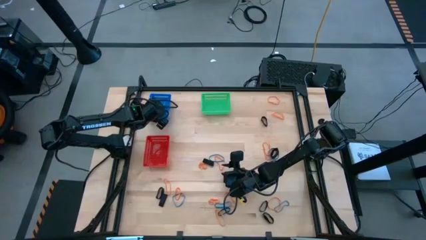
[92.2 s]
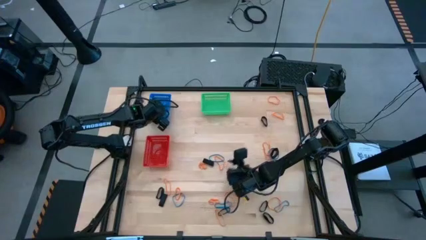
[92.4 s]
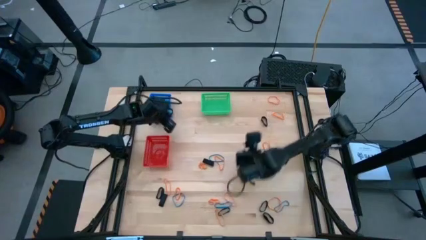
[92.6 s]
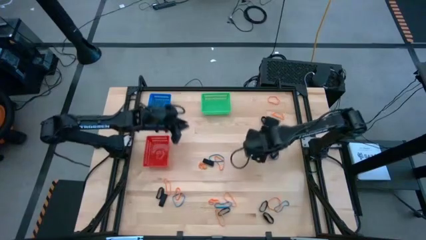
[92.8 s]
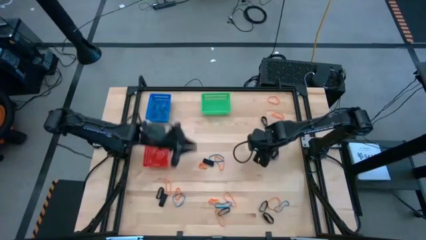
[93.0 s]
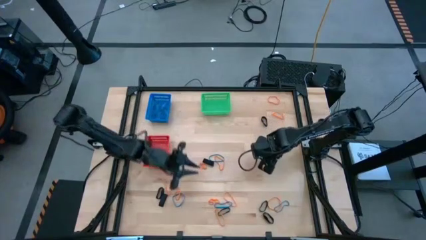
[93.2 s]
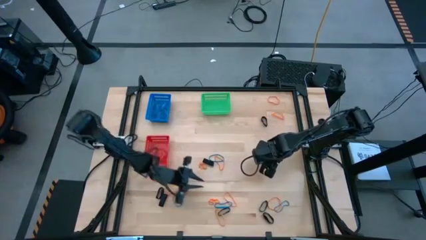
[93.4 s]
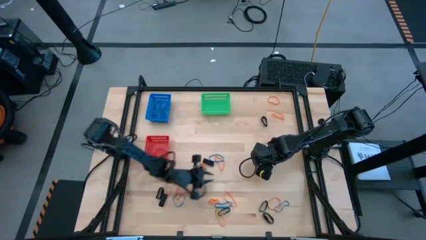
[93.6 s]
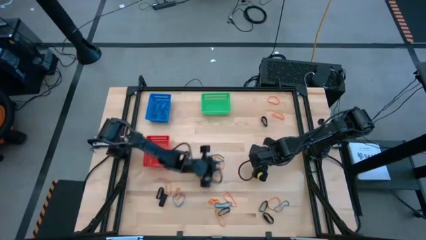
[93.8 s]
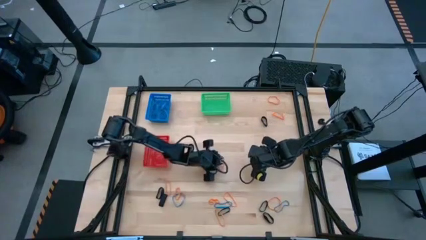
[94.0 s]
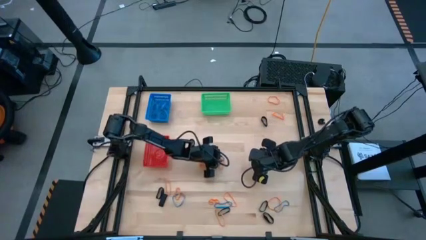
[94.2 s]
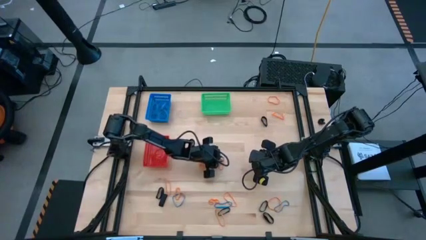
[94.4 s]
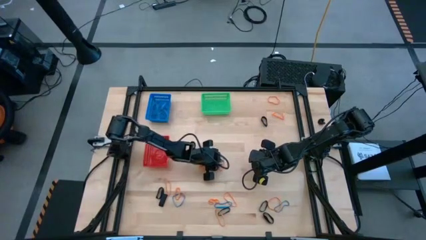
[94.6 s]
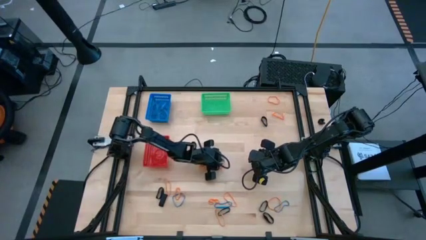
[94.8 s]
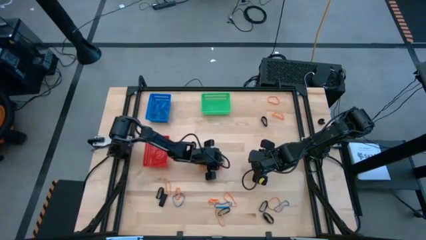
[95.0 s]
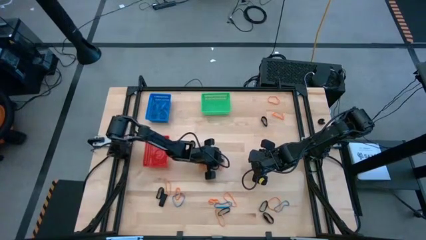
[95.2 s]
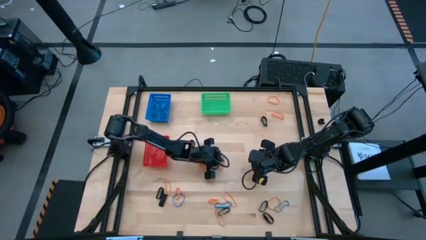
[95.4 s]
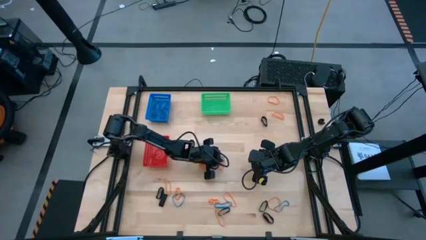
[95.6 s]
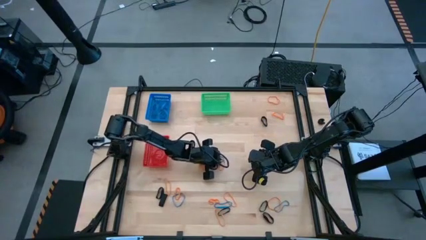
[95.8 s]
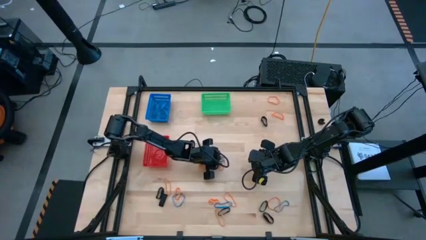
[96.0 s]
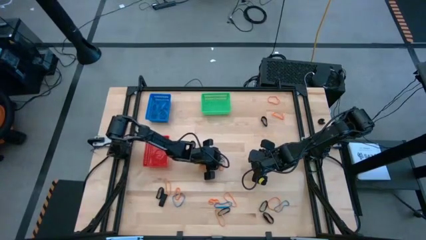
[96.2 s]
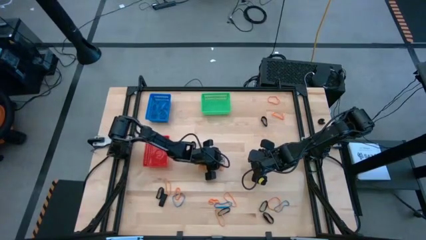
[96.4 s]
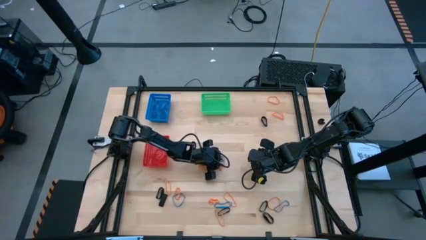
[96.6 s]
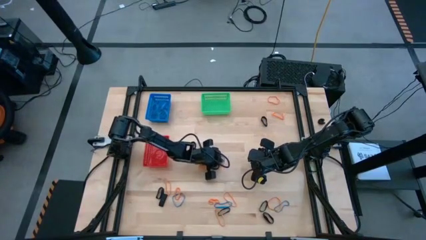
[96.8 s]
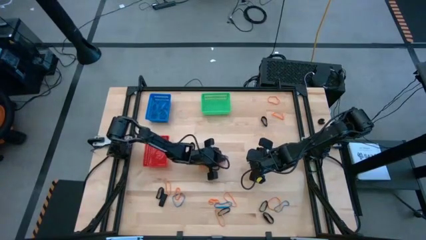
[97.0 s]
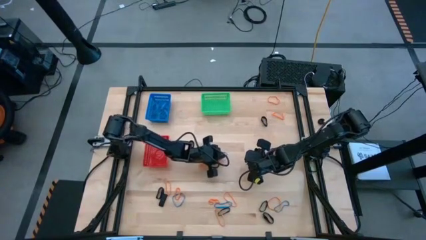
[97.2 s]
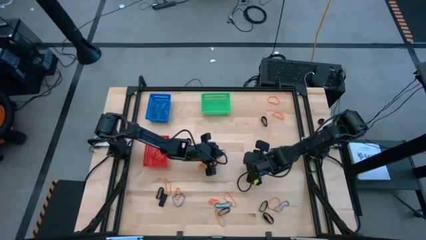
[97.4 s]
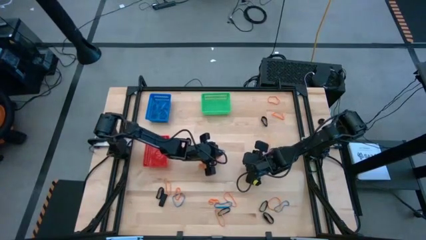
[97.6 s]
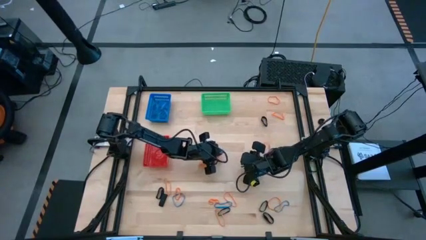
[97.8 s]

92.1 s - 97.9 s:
Task: Sort rubber bands into baskets
Put the blue rubber band into the blue bin

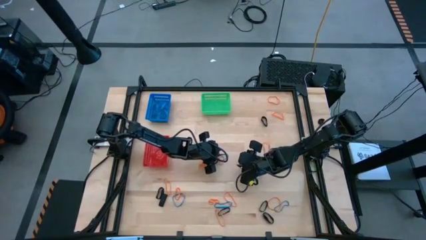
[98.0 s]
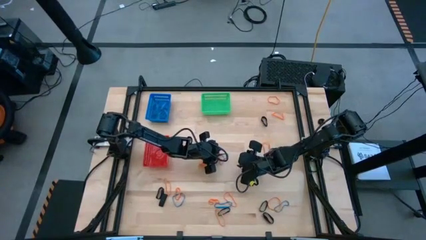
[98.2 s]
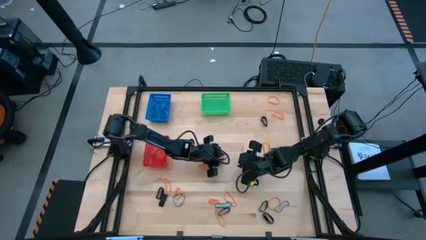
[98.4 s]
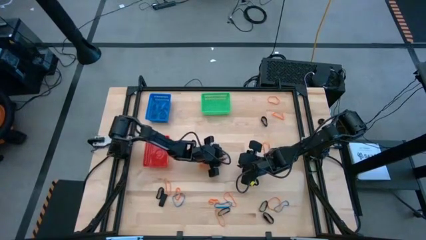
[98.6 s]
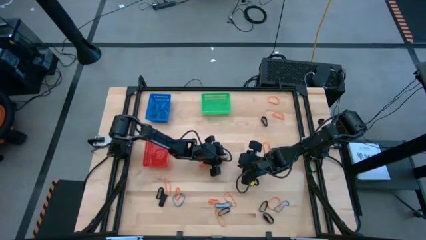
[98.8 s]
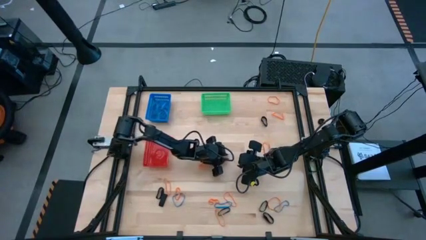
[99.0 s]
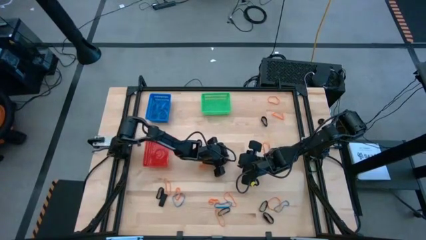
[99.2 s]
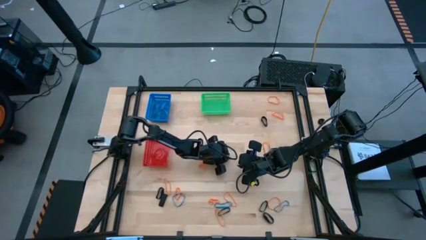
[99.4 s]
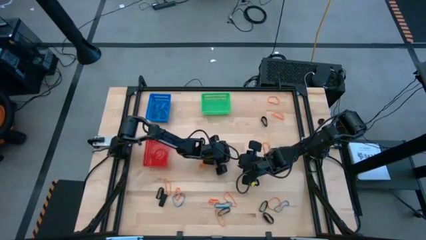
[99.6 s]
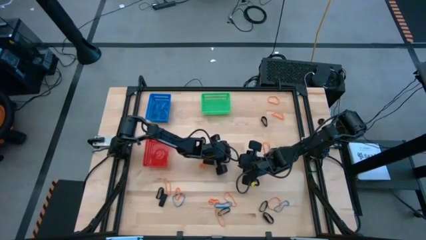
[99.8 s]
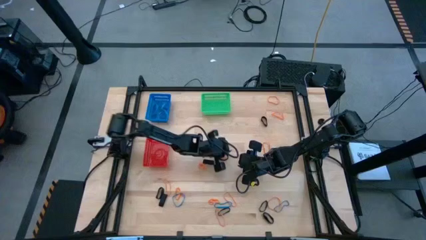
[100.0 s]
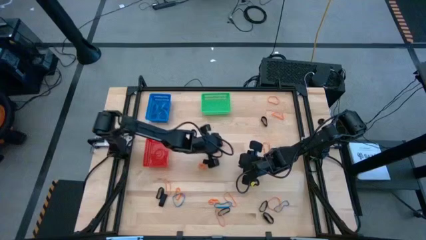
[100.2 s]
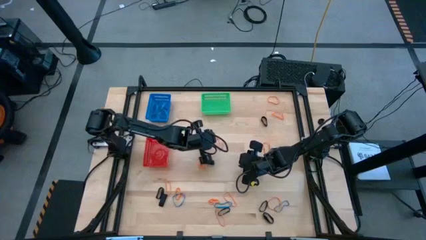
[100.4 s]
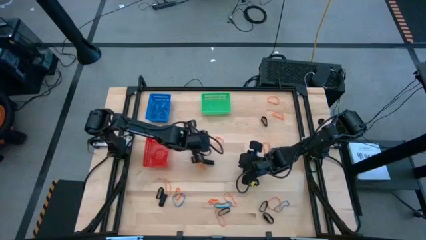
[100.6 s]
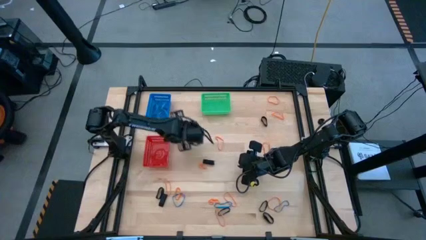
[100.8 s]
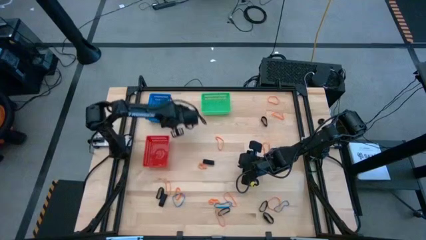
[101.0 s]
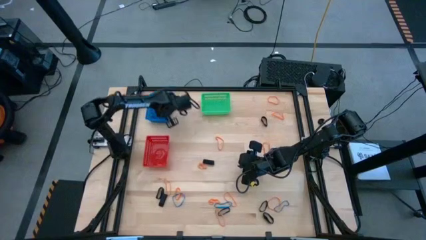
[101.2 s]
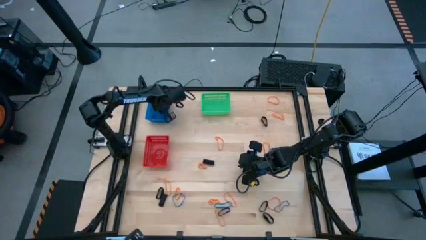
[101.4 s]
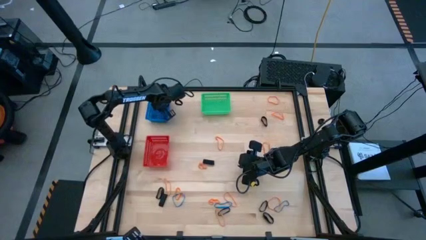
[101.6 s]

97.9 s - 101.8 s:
Put the blue rubber band into the blue bin

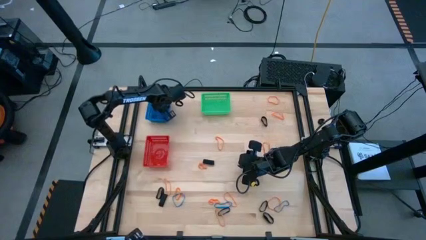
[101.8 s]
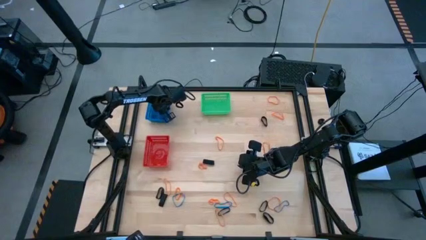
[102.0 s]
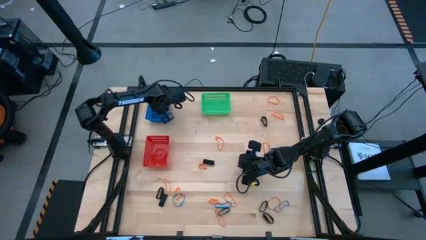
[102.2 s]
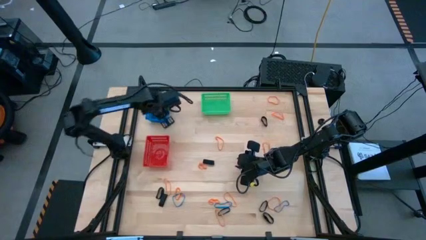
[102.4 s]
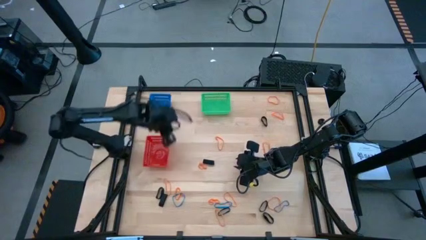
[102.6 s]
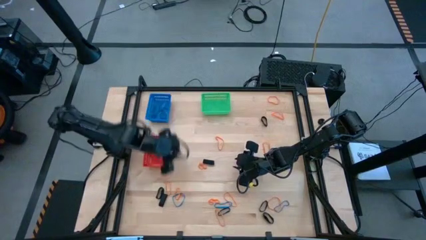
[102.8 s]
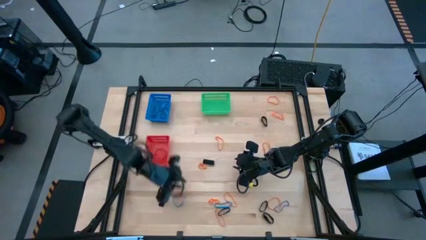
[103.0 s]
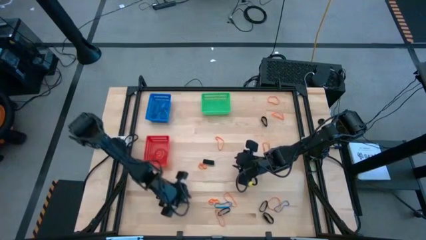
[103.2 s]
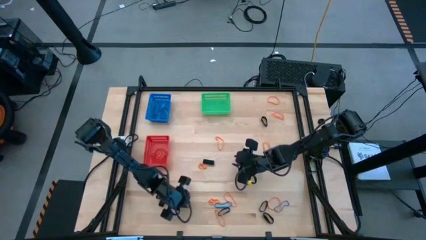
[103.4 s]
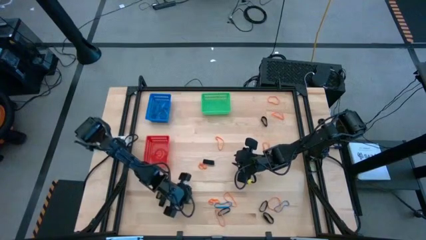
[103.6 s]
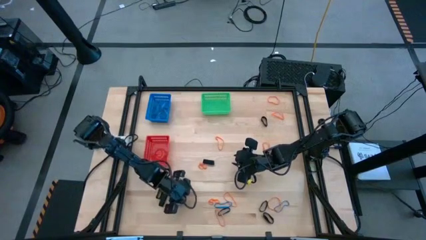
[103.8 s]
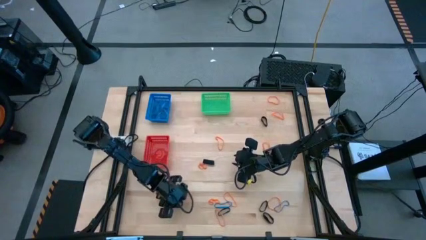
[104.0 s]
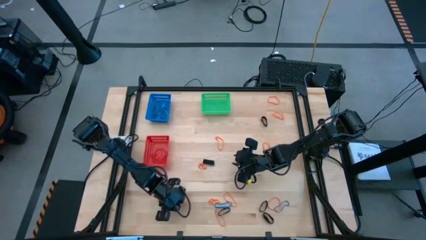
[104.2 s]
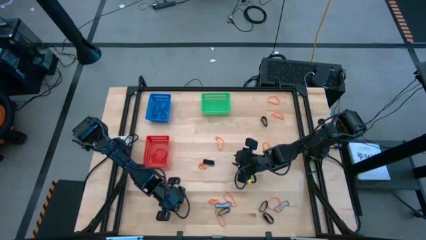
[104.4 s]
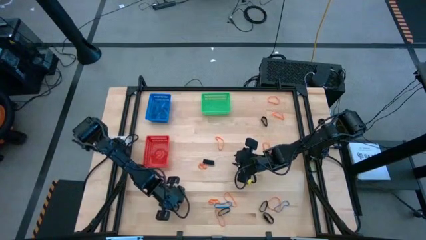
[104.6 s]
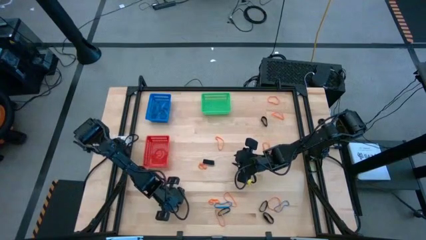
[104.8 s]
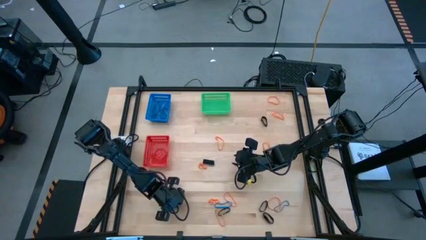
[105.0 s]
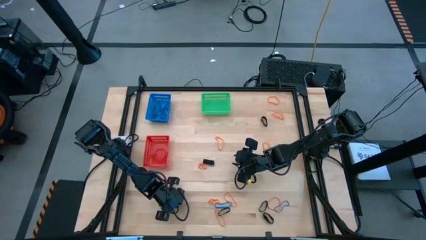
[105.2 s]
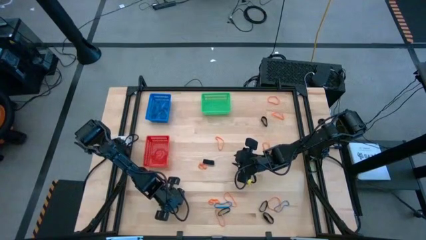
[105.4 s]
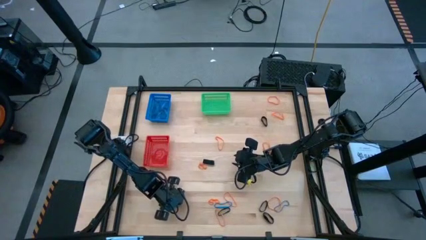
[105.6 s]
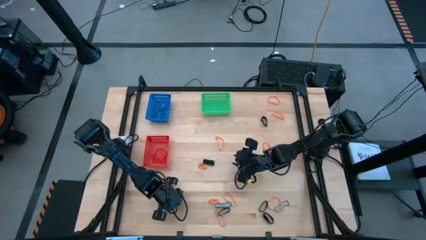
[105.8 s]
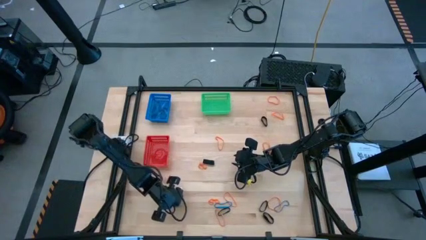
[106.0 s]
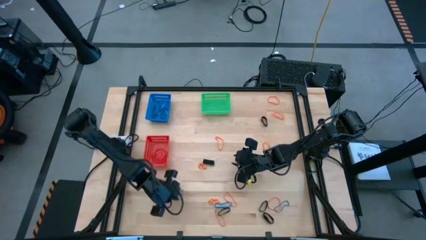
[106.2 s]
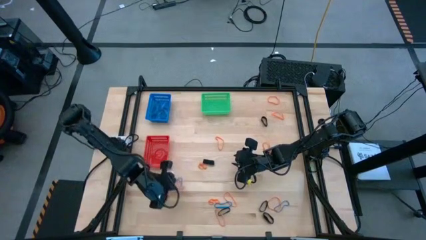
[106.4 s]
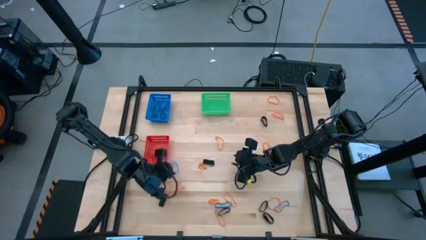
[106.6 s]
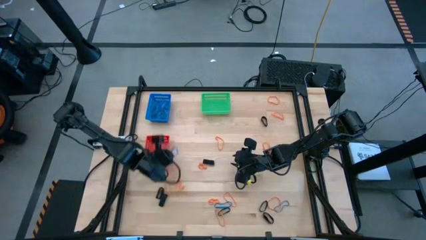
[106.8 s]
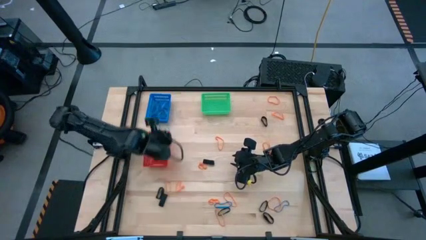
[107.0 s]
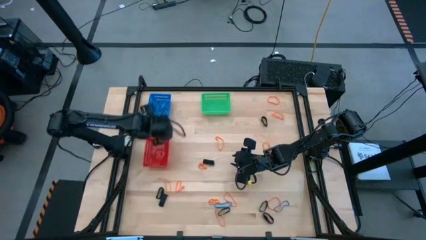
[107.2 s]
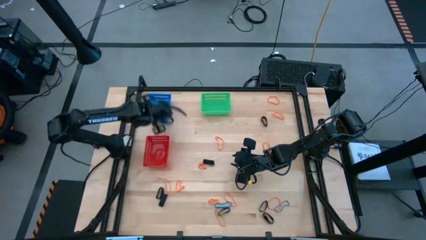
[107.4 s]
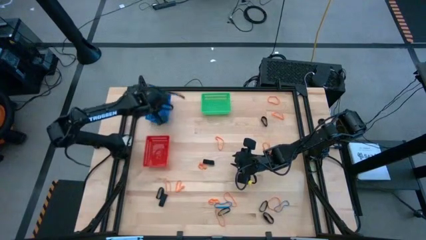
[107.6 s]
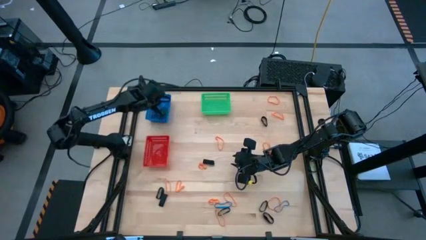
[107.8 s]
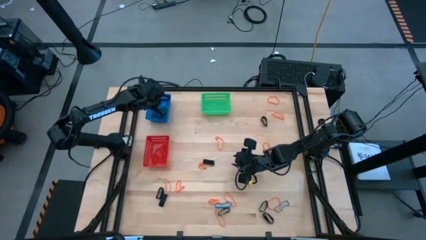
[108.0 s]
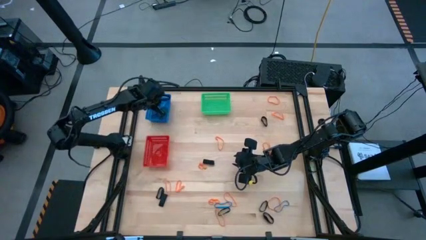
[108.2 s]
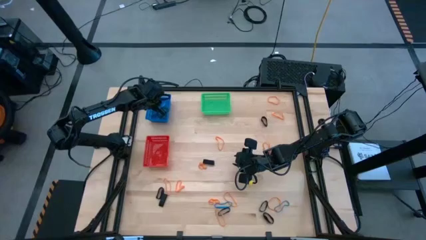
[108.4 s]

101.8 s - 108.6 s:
Put the blue rubber band into the blue bin

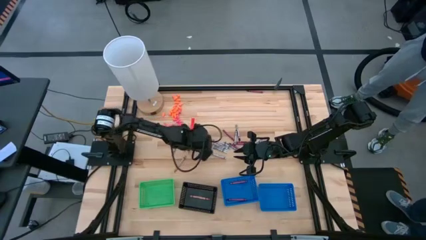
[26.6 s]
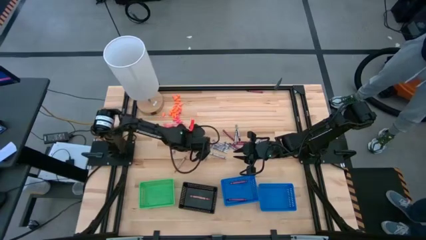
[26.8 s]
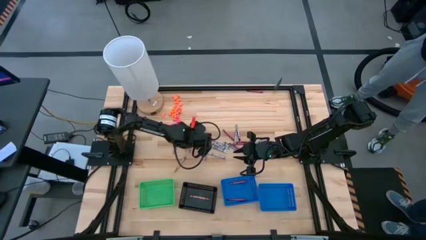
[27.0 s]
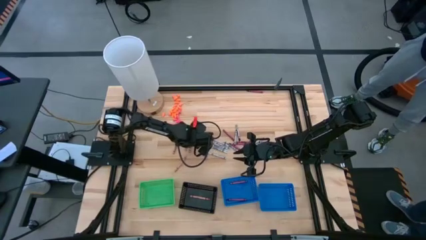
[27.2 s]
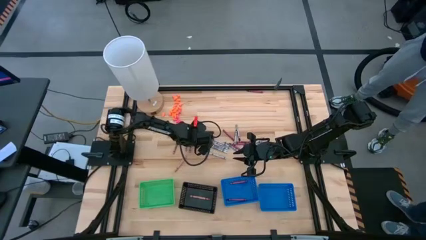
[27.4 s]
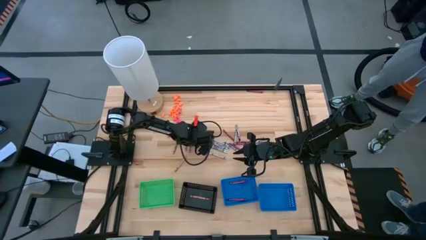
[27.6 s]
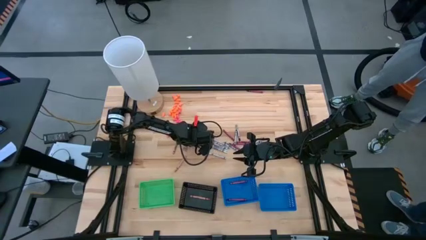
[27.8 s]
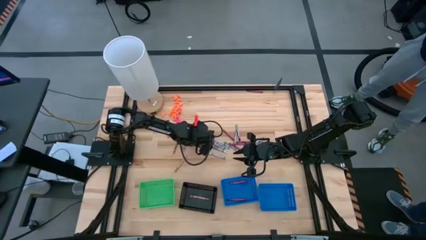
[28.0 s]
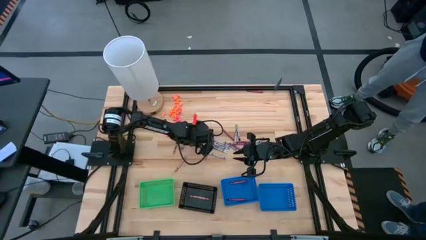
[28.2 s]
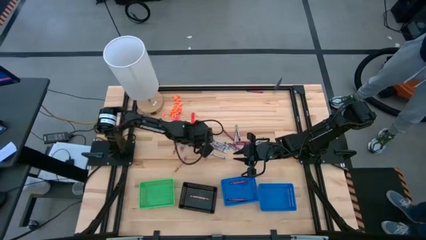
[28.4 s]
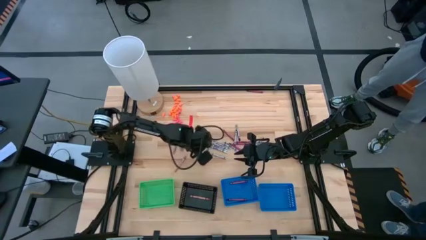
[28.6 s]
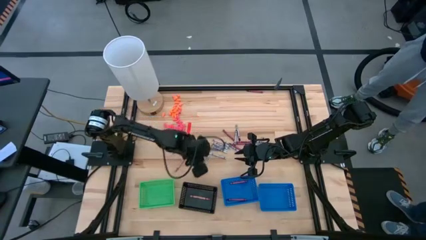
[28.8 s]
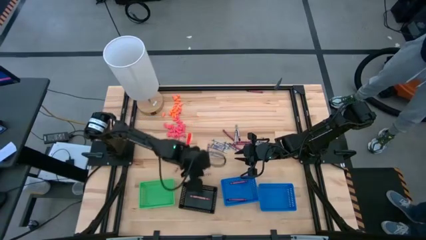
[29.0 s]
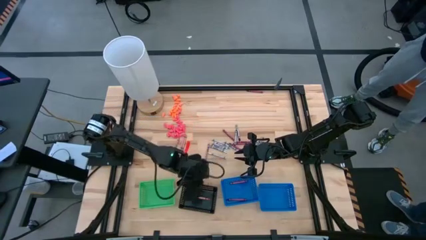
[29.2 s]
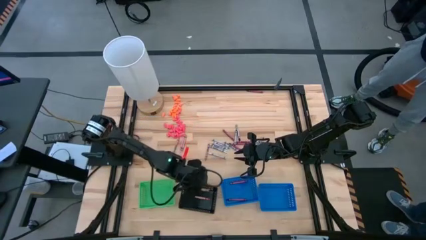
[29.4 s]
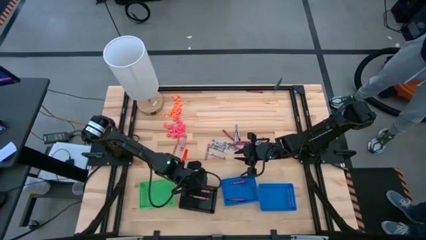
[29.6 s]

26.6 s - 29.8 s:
Task: Sort crayons
Put the pink crayon into the black bin
